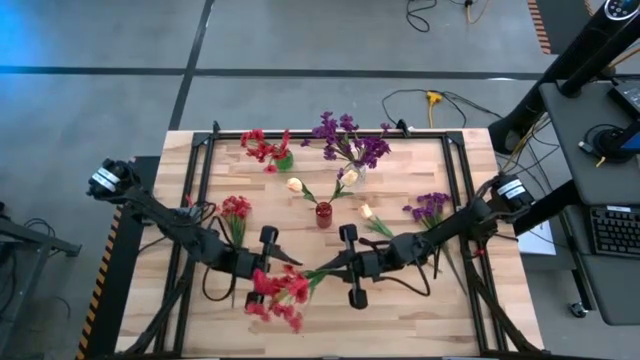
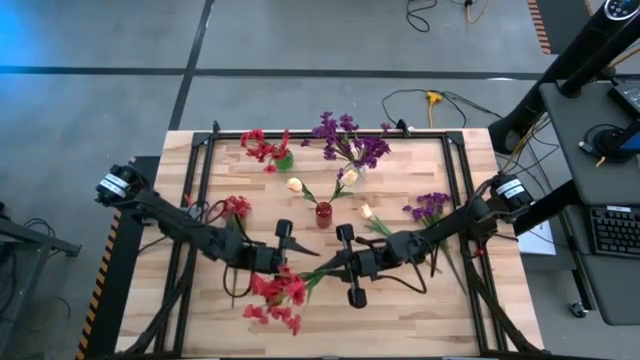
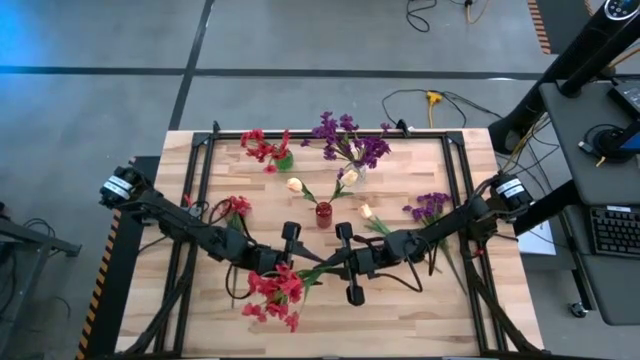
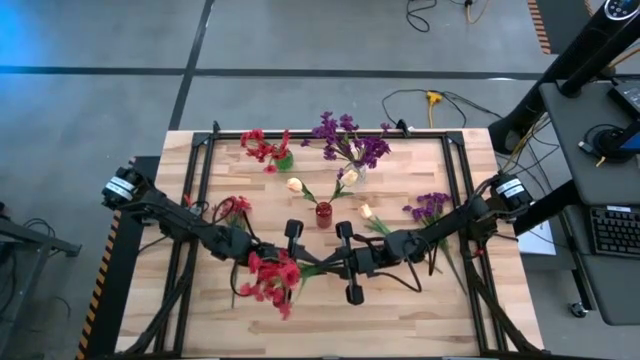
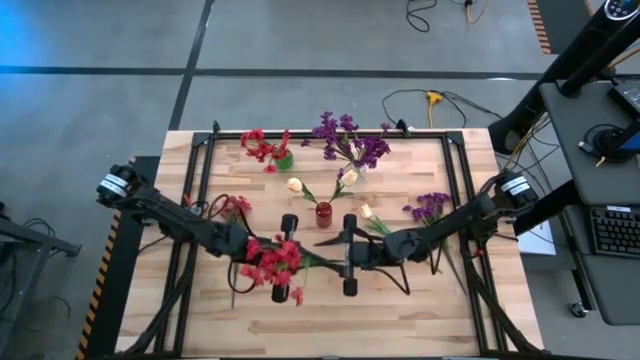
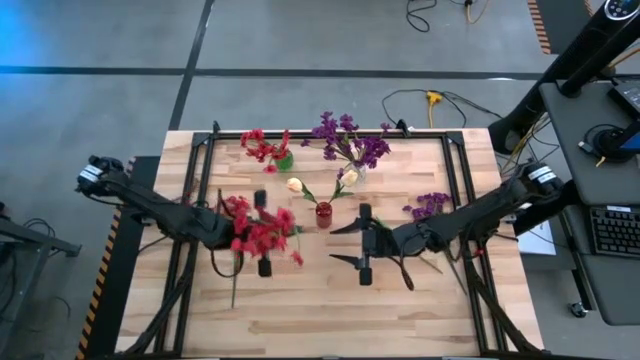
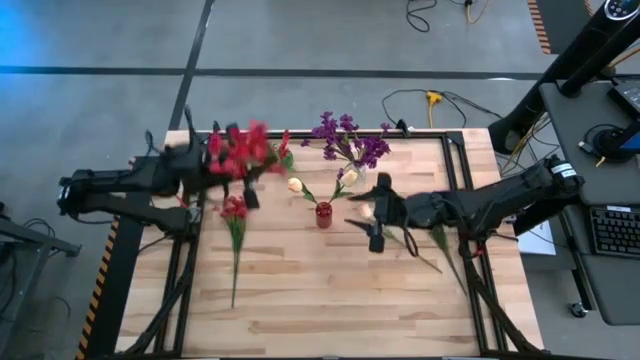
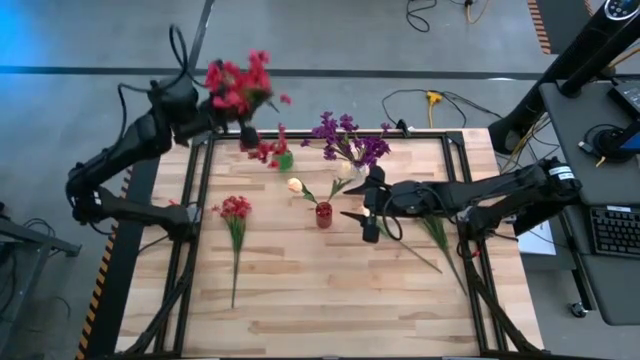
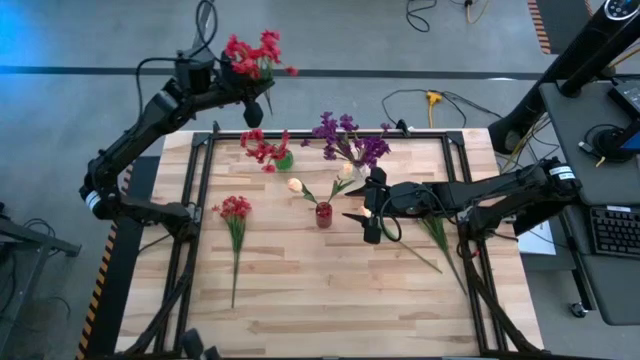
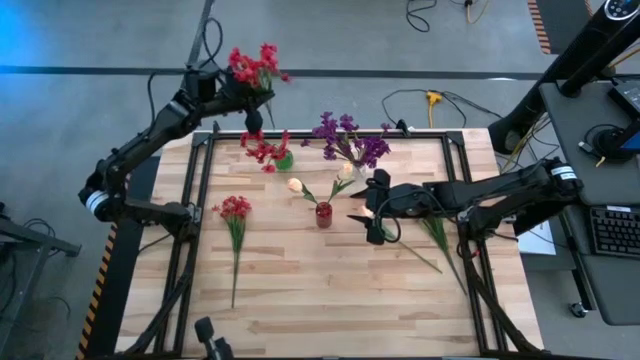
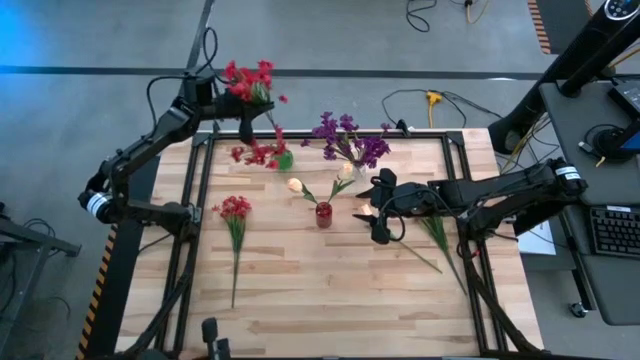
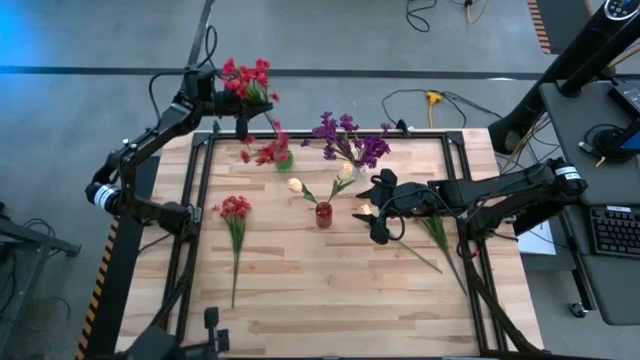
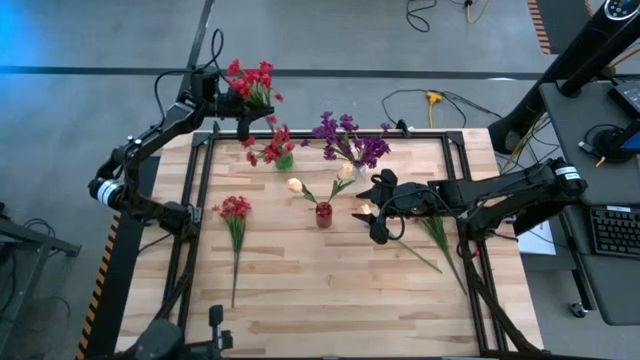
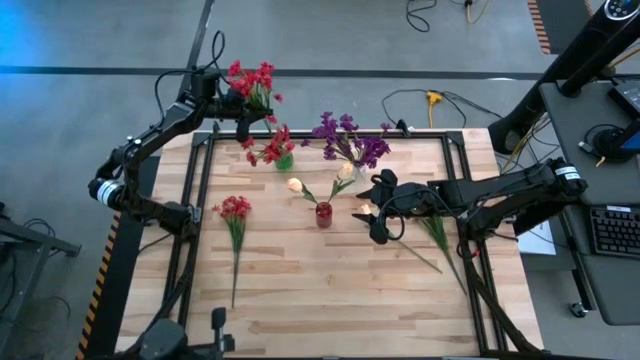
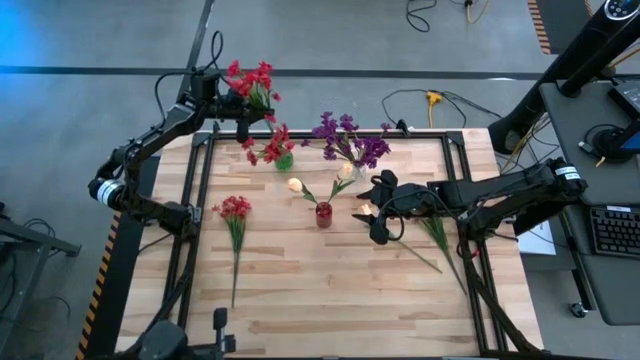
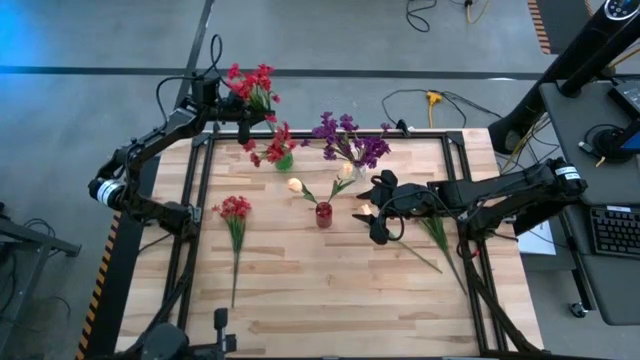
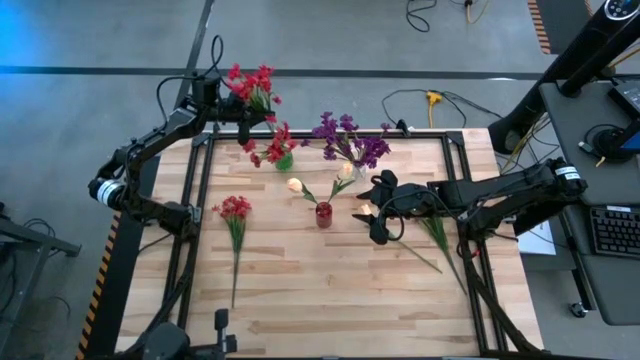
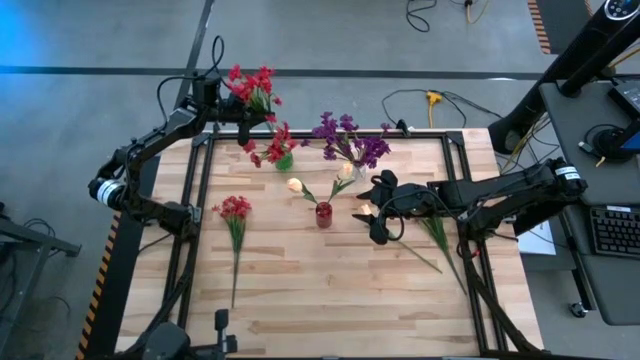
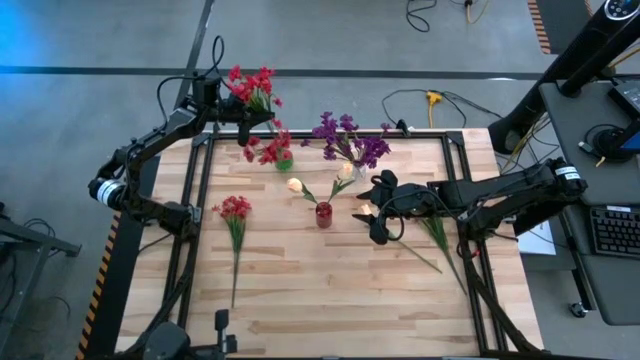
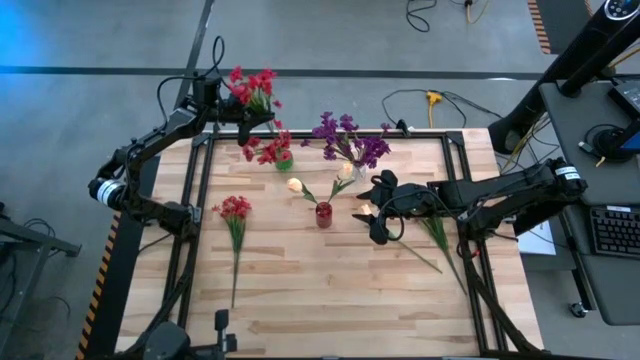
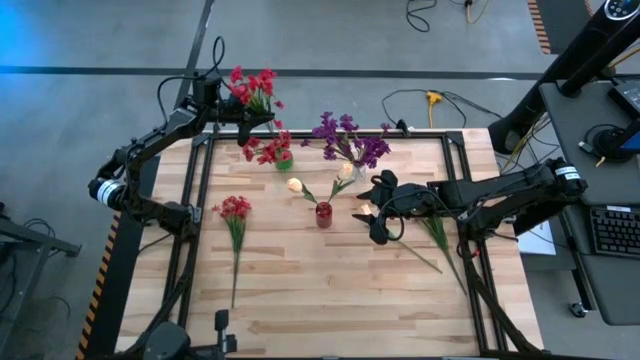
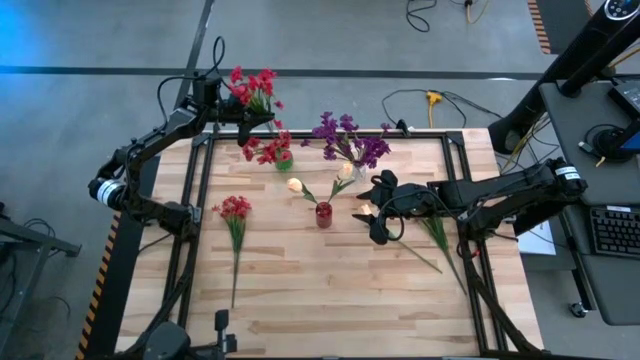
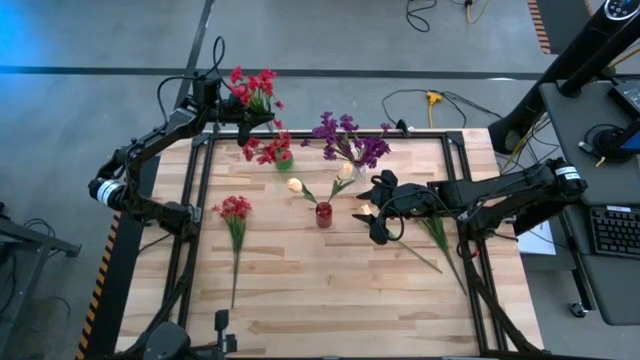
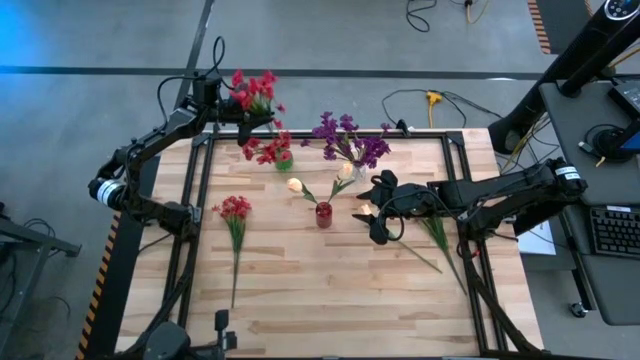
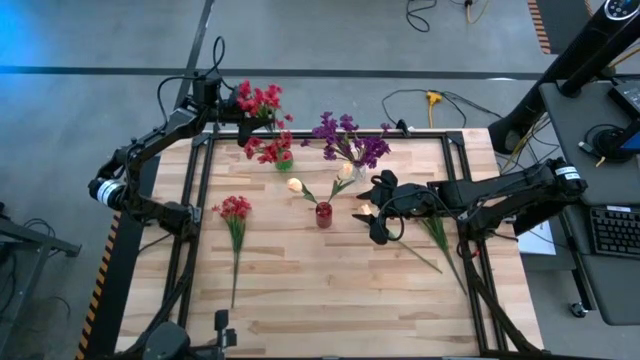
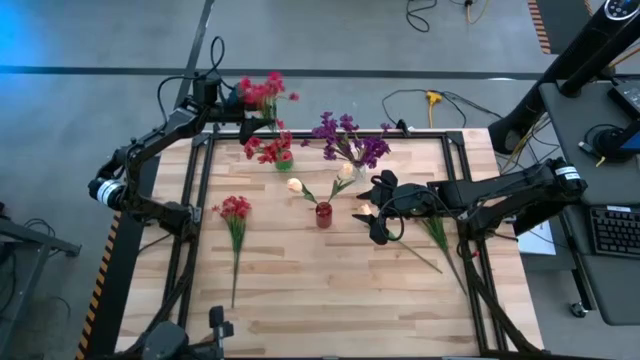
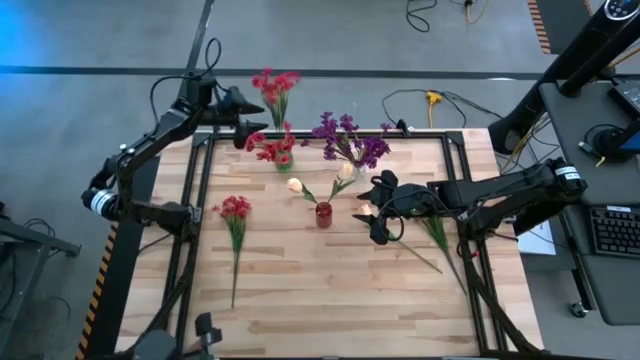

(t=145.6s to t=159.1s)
Task: Sort flowers into vase by color
Put the red flowers into the green vase

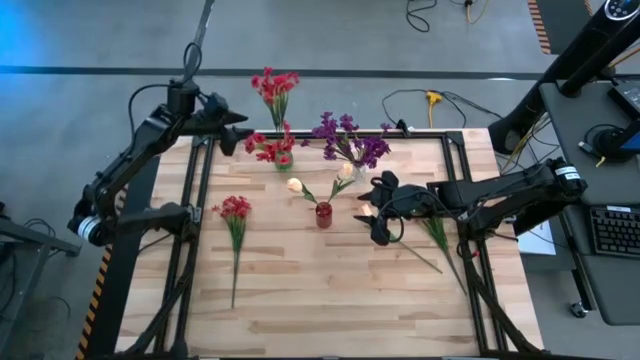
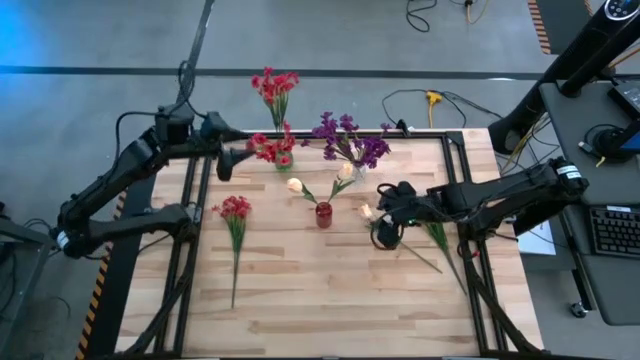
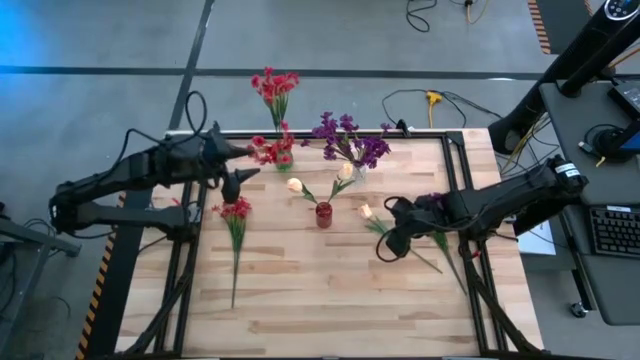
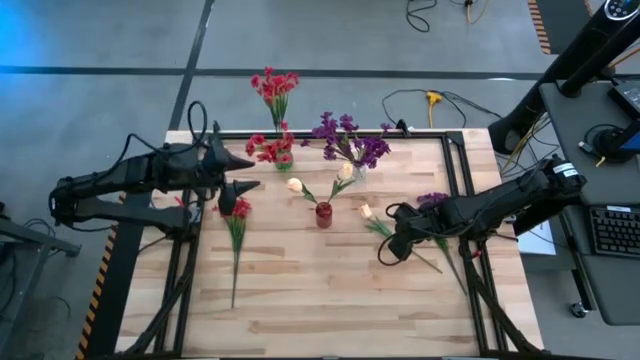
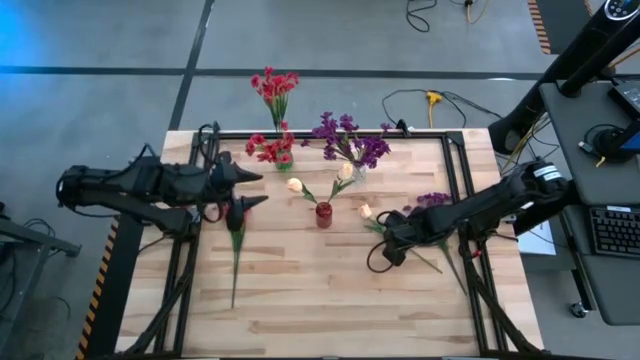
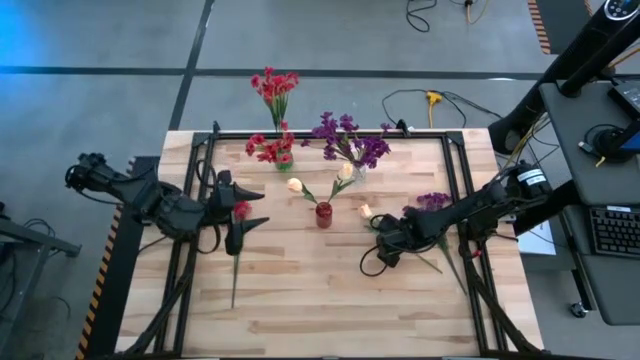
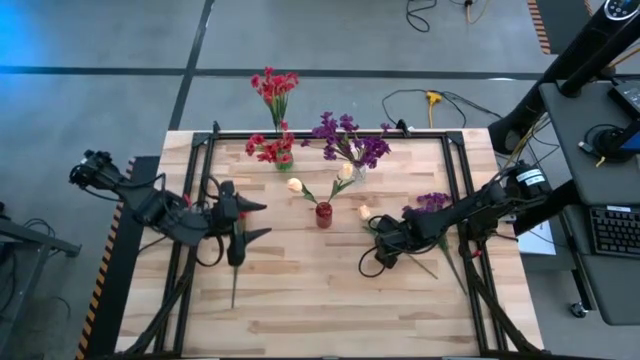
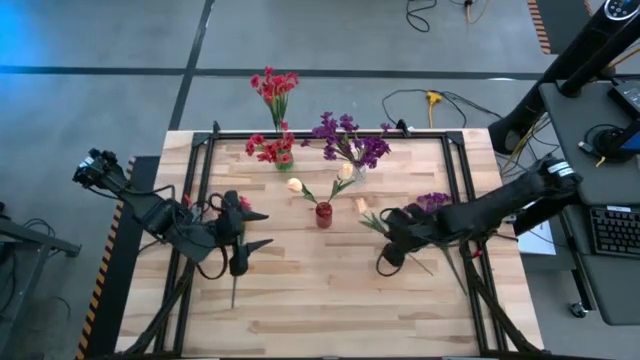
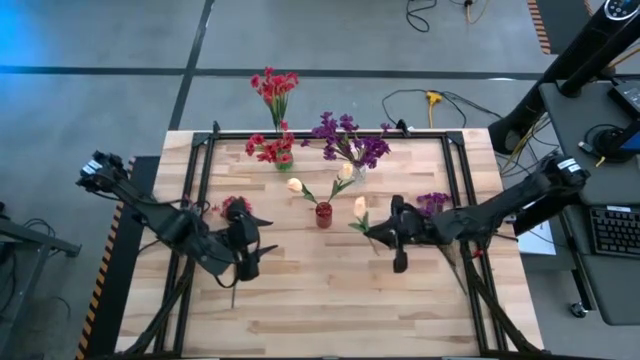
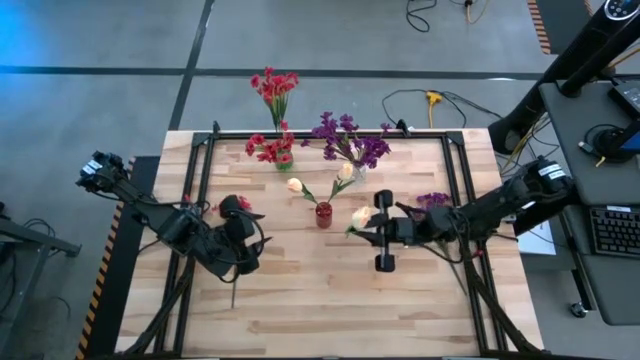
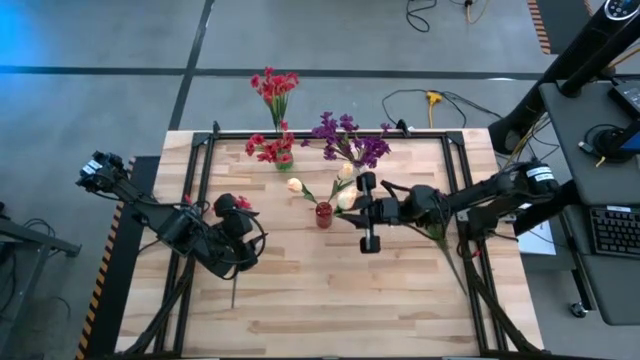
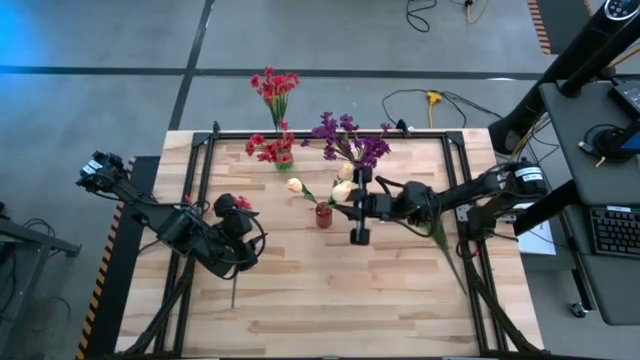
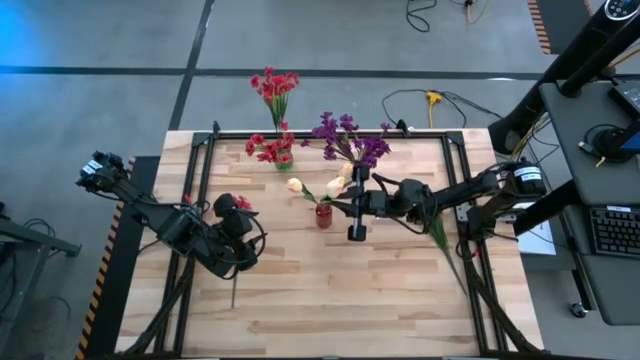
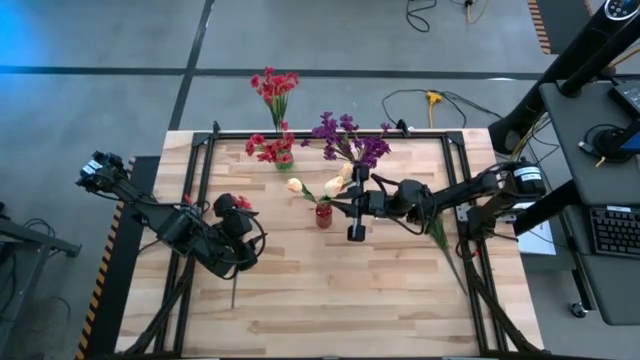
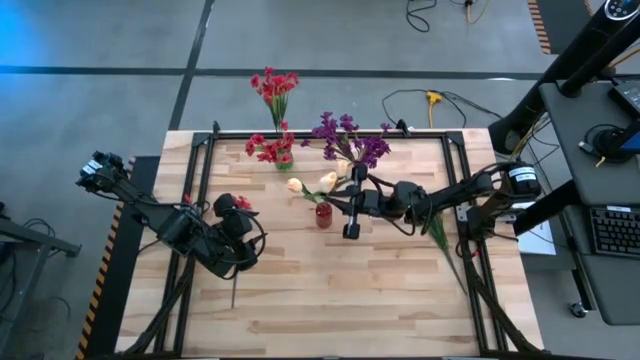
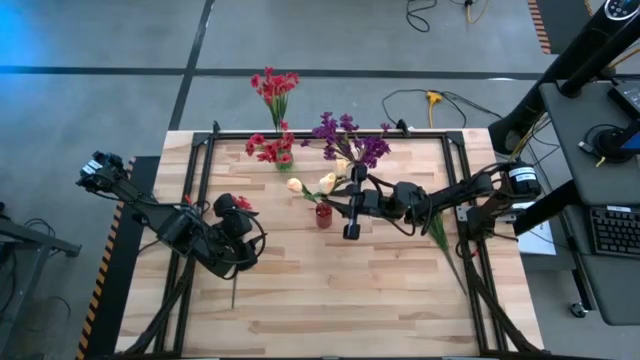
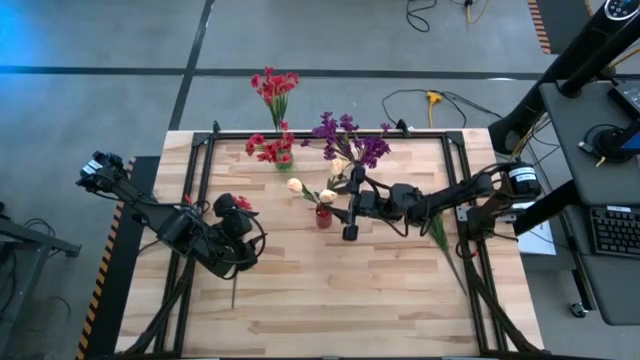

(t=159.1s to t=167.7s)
Put the yellow tulip into the red vase
